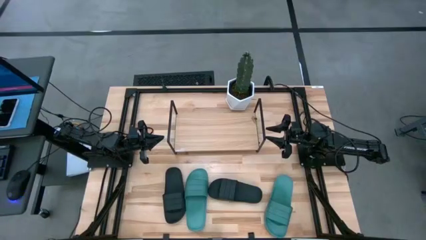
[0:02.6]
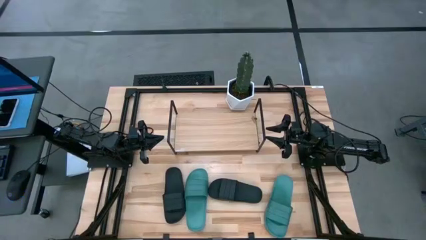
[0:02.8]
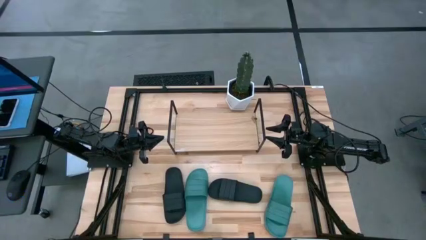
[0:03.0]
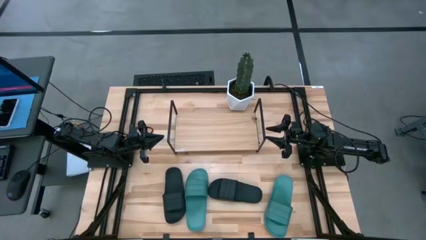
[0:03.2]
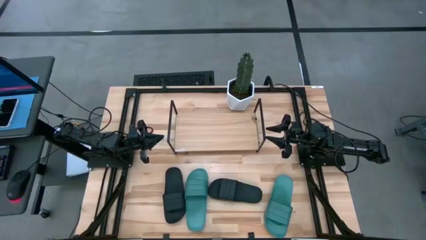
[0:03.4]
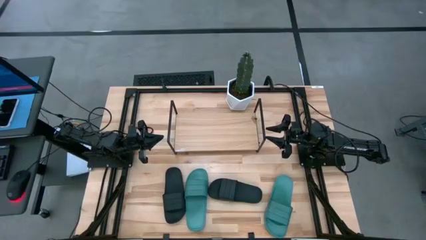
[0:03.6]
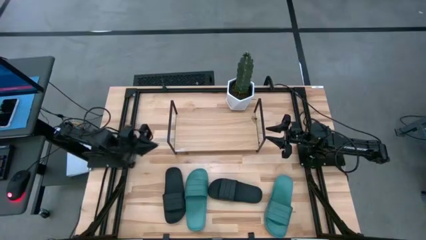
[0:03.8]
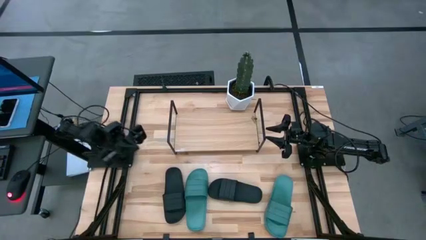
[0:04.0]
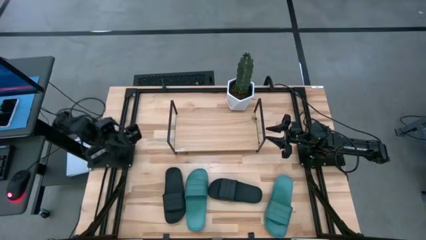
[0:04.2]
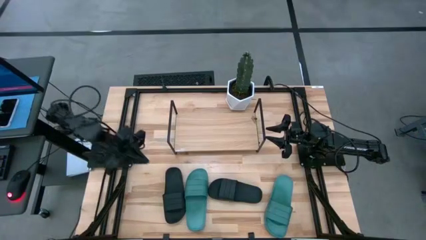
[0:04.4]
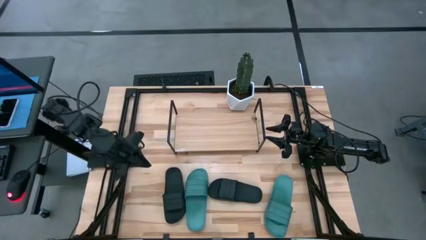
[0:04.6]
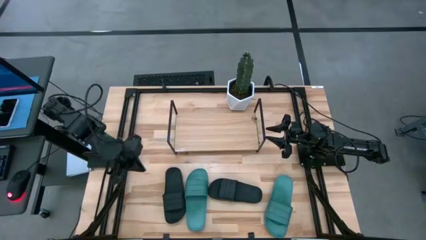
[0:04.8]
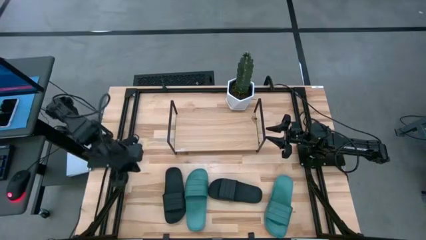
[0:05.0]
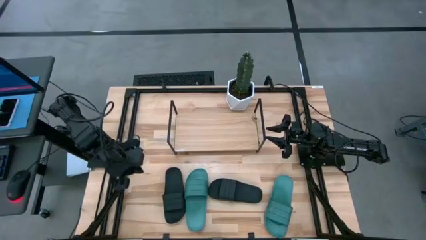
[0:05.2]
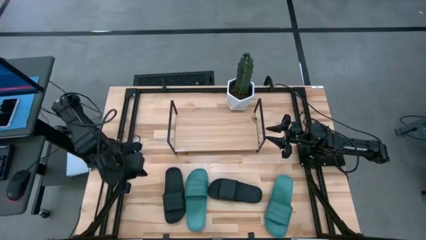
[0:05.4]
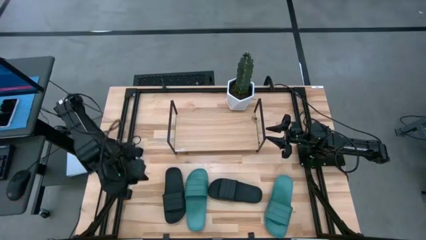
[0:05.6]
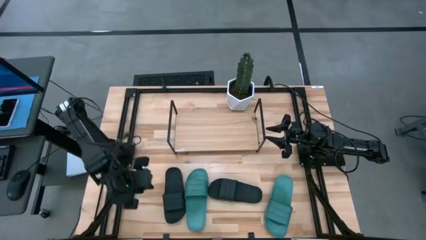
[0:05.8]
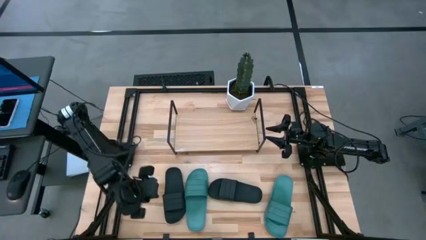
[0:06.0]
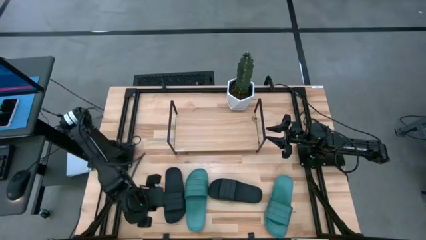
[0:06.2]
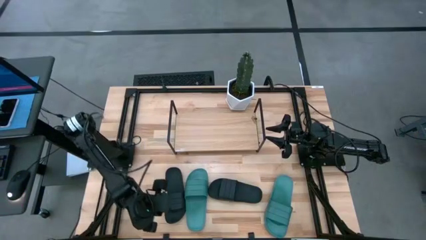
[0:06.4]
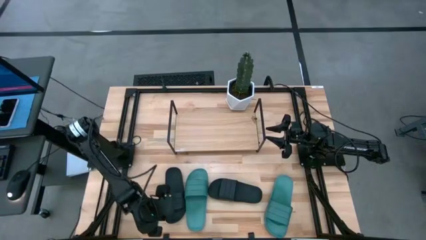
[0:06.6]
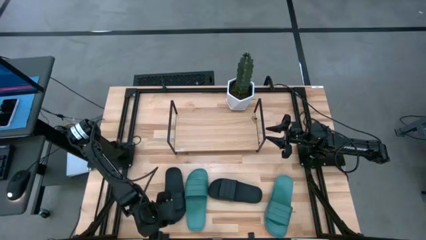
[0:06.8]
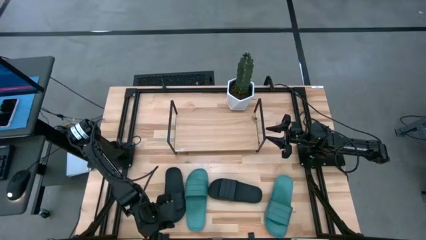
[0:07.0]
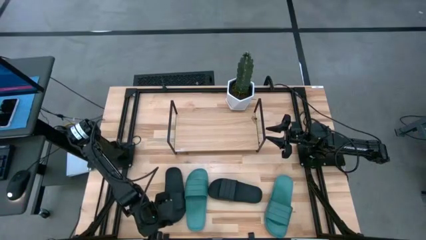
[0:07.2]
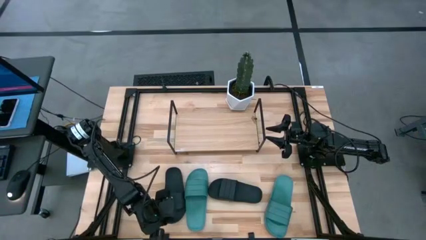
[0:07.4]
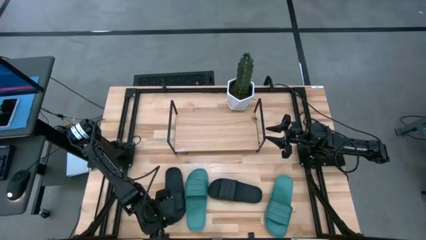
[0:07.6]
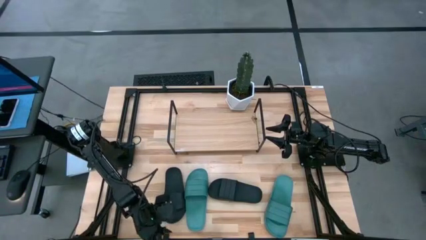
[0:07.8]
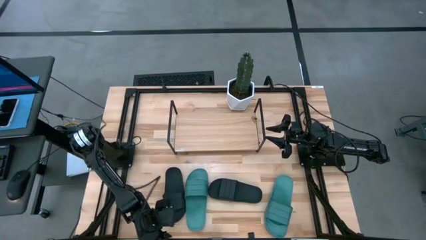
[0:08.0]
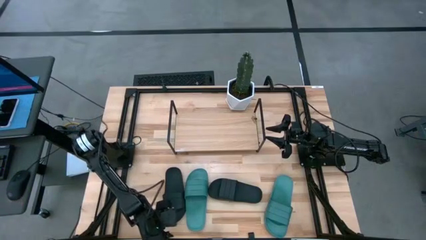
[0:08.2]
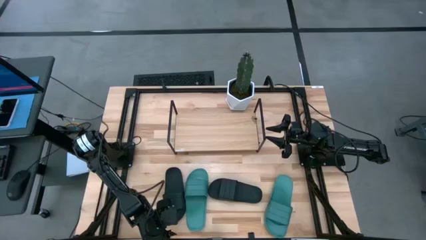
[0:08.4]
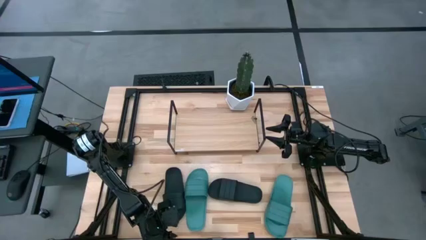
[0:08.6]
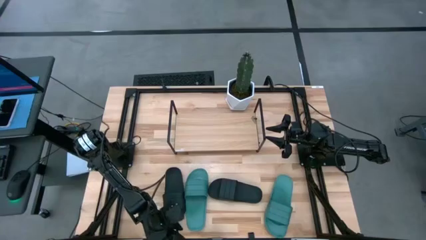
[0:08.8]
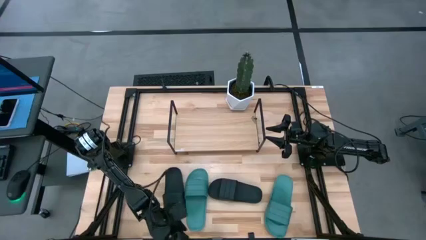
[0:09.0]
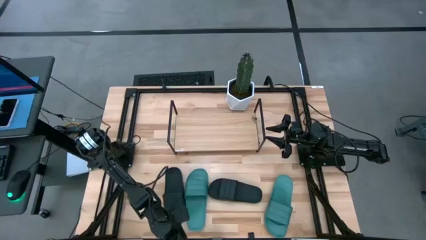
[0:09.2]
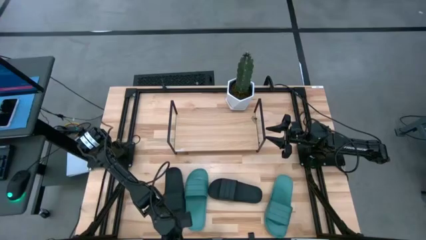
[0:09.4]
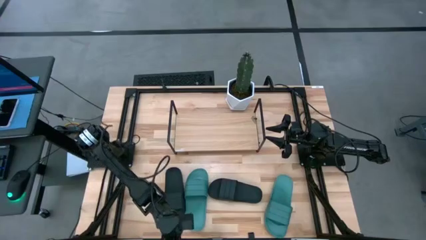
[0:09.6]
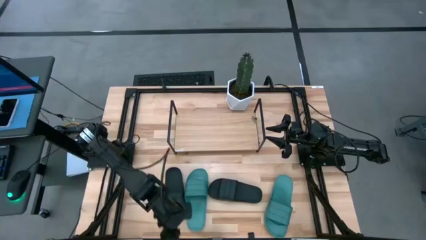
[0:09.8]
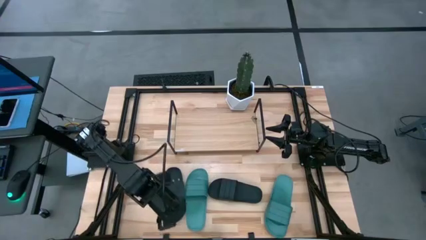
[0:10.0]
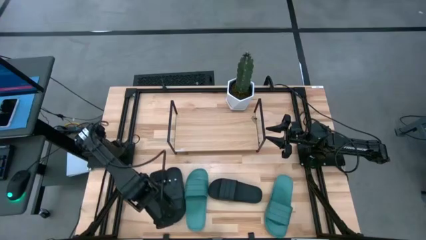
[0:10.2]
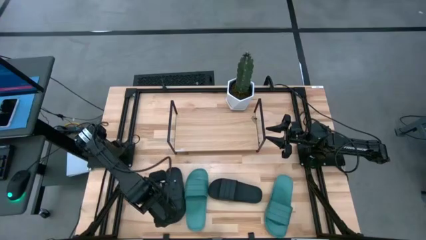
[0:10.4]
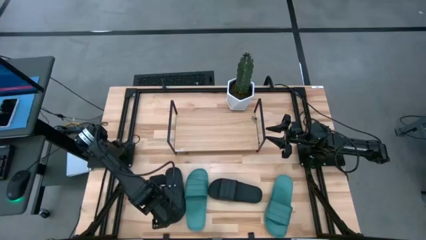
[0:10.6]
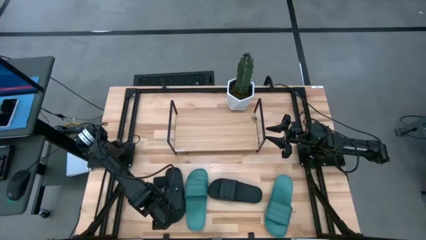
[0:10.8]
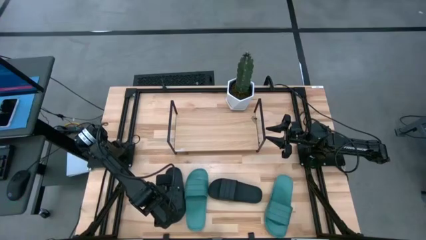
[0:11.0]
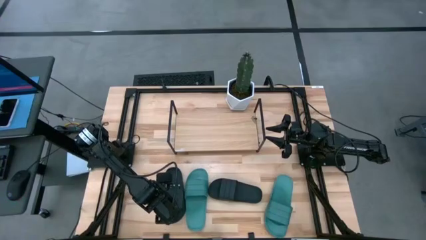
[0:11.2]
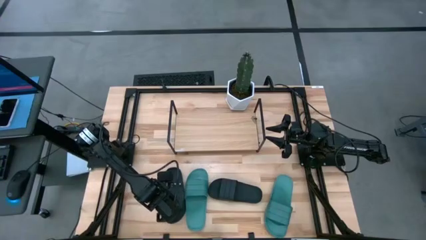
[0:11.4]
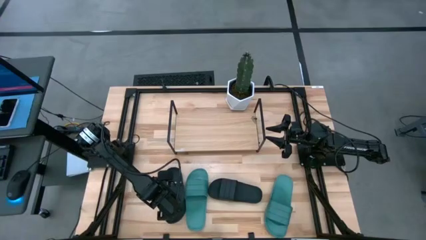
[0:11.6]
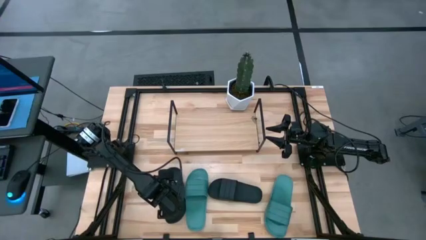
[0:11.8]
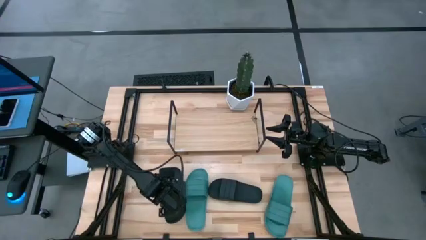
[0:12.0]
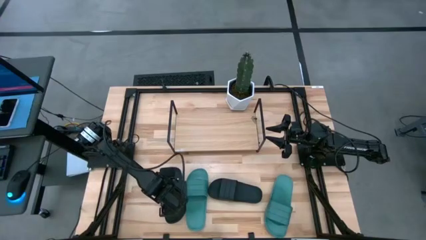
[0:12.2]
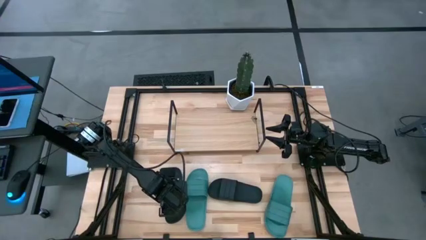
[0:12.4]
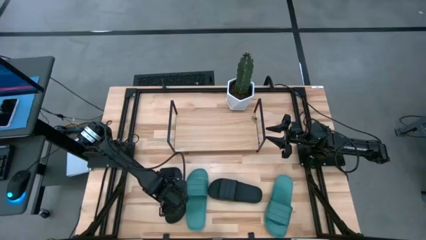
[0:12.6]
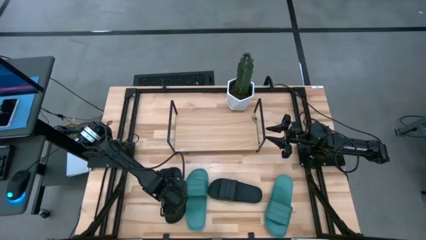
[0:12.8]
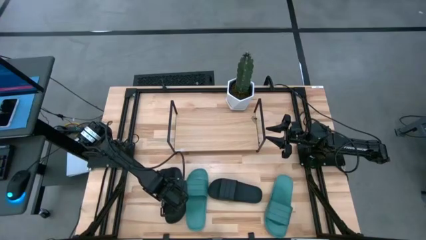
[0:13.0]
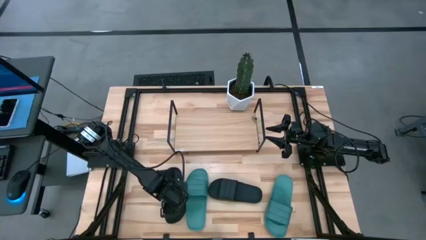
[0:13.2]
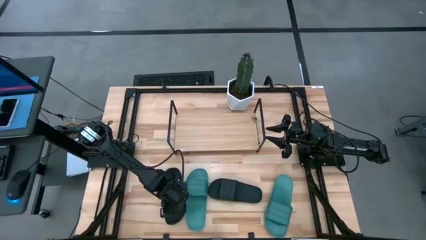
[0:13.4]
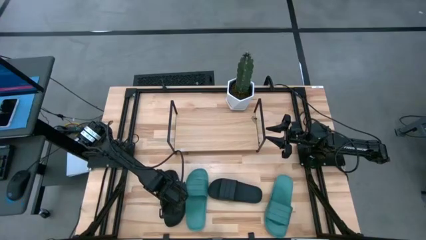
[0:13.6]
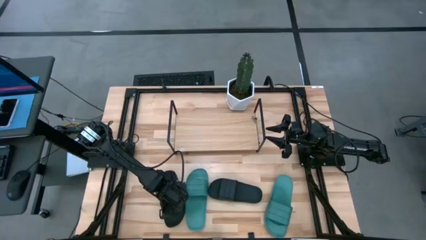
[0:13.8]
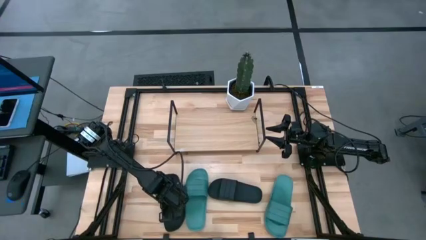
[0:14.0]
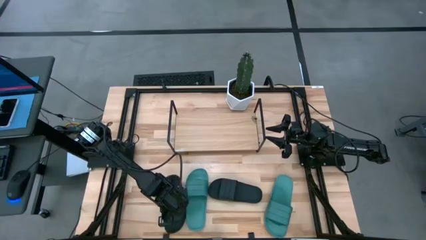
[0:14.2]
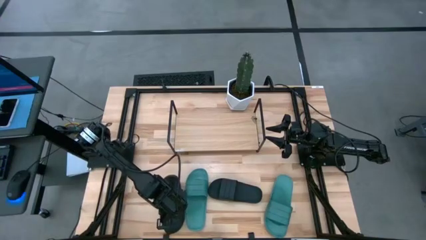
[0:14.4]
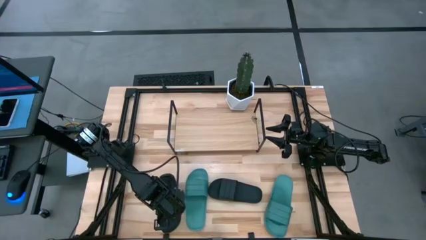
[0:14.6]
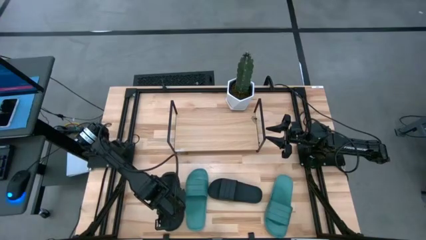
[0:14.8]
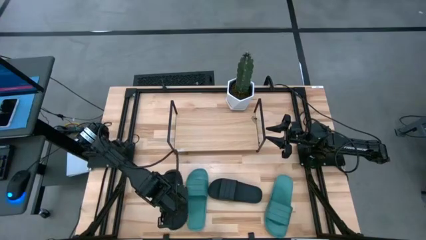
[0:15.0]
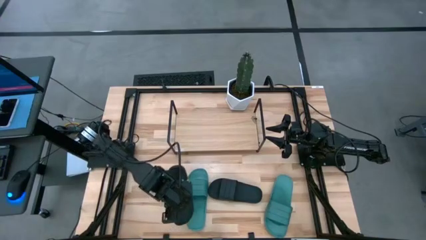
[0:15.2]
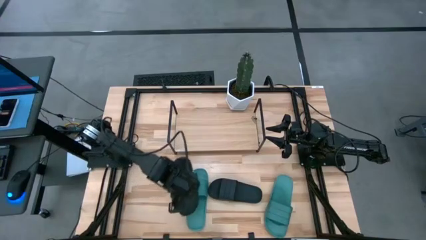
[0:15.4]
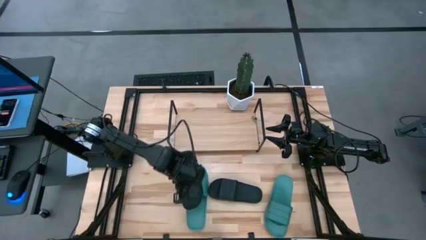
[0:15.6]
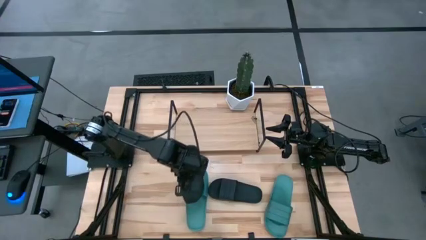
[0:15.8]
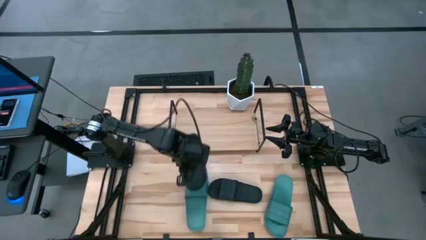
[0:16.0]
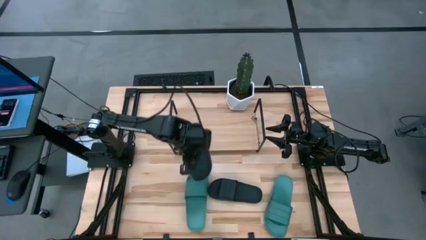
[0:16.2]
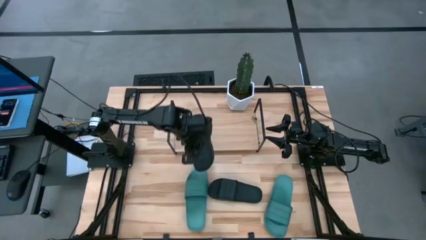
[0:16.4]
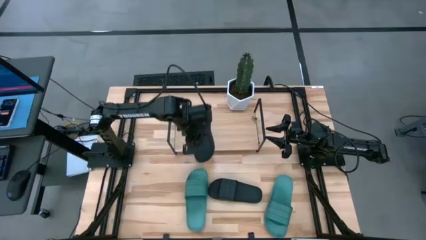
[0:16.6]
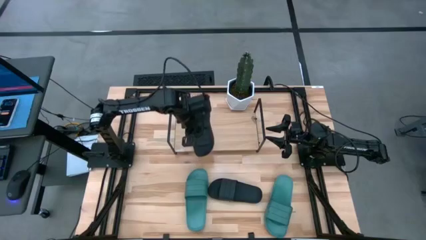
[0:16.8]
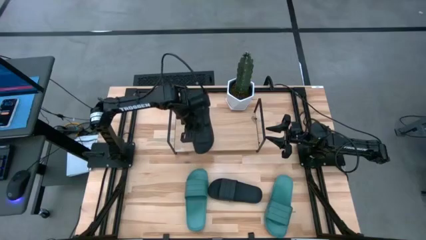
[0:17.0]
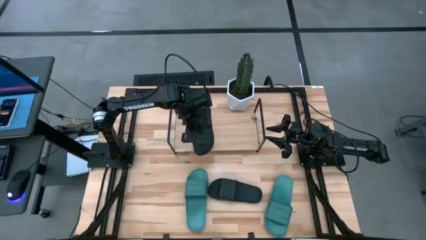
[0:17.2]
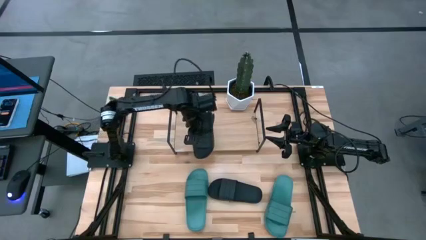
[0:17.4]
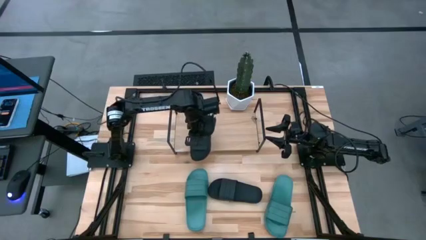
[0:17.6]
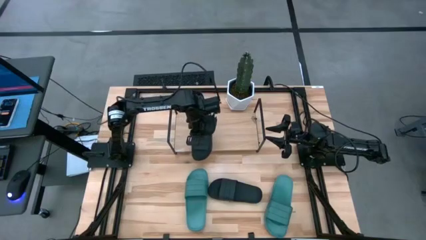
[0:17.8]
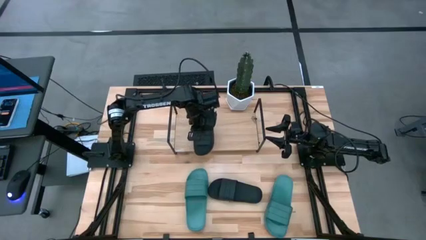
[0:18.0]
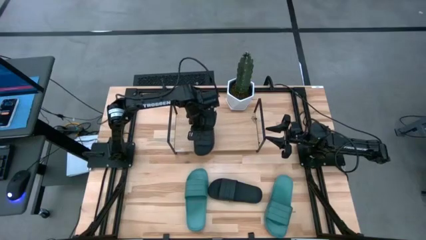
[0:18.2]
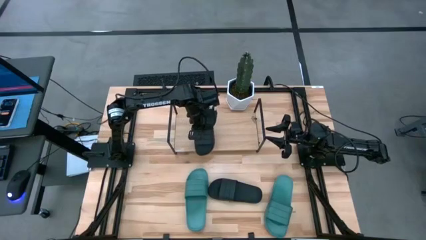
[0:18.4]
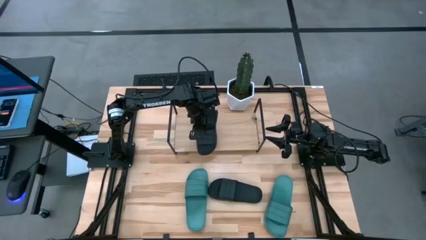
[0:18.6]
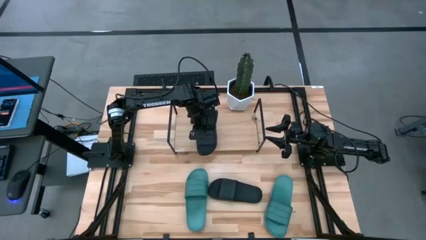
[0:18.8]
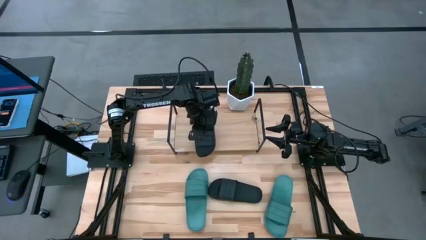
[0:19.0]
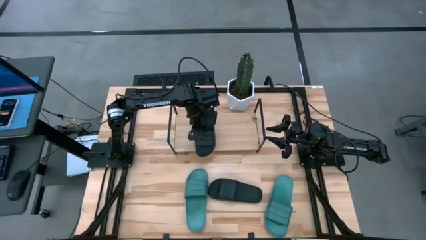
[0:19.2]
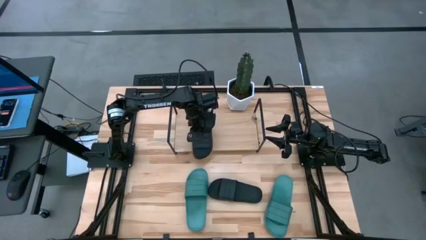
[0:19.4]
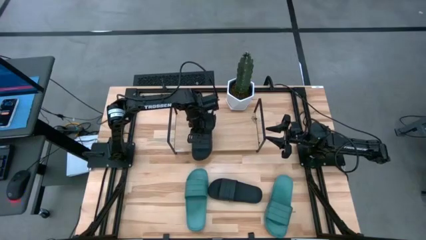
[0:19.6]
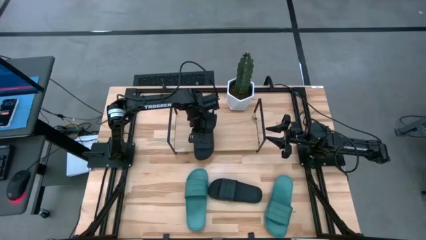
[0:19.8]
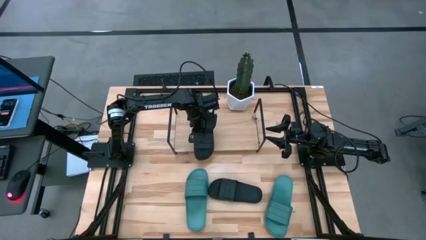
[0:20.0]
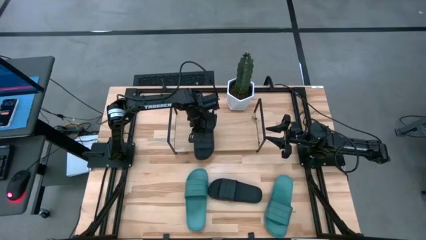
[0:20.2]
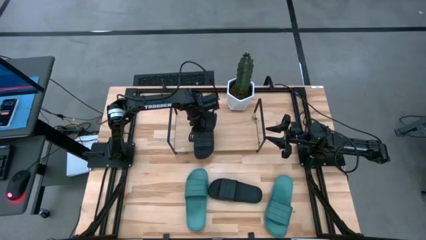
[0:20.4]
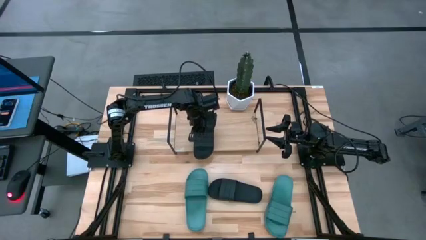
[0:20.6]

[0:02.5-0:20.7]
Task: Pick and place slides into the shelf
Put the left black slipper on the shelf
